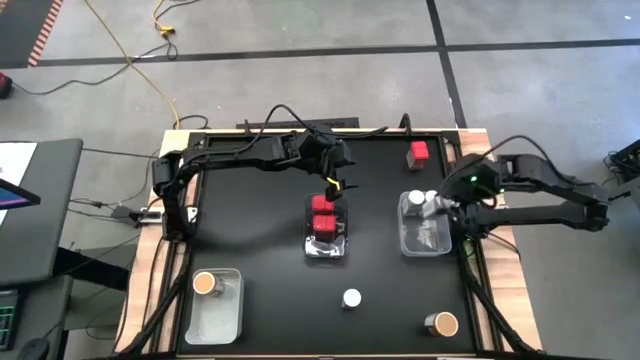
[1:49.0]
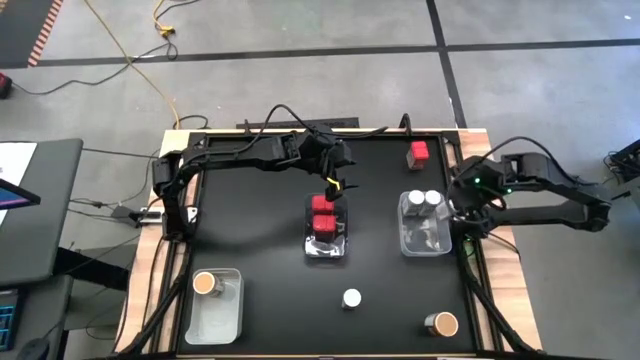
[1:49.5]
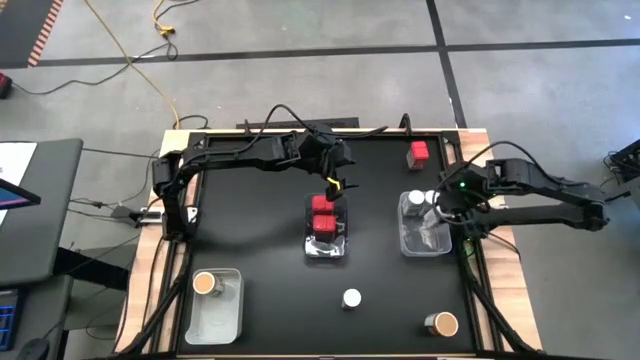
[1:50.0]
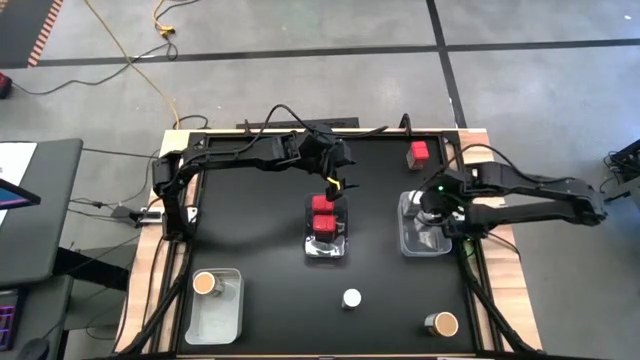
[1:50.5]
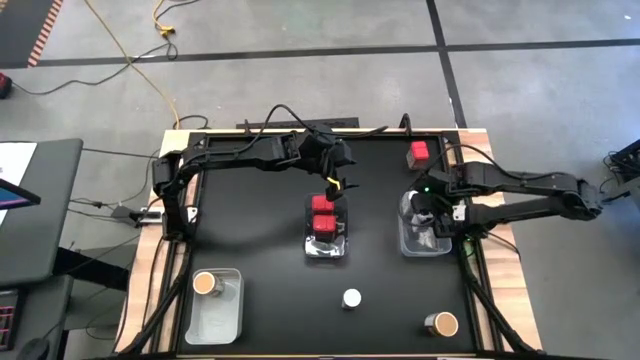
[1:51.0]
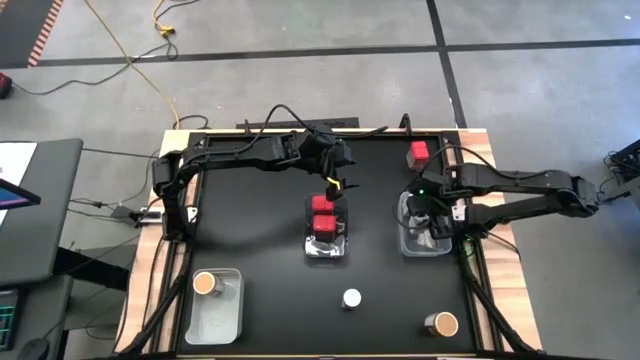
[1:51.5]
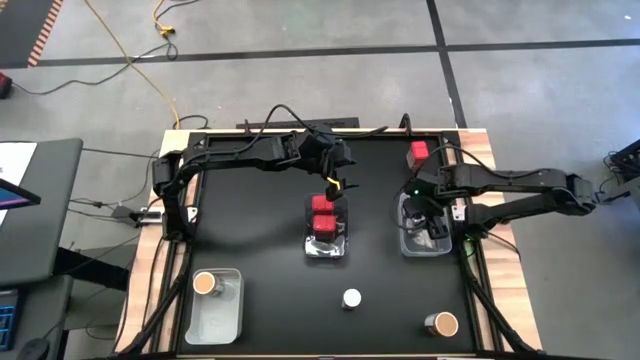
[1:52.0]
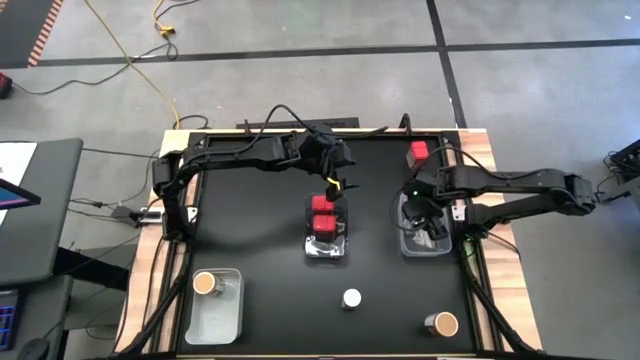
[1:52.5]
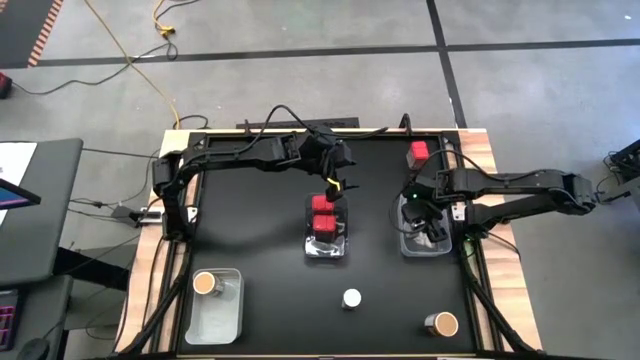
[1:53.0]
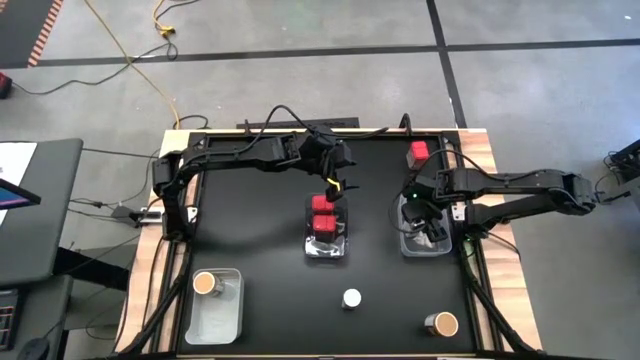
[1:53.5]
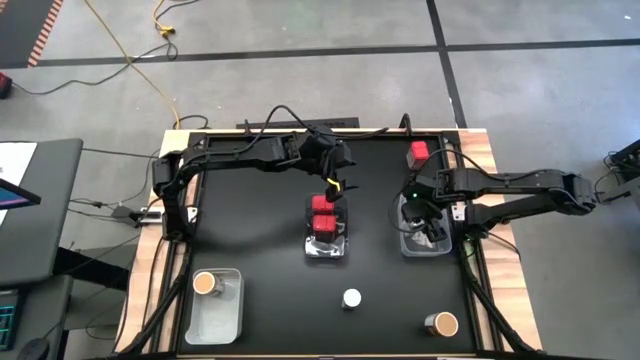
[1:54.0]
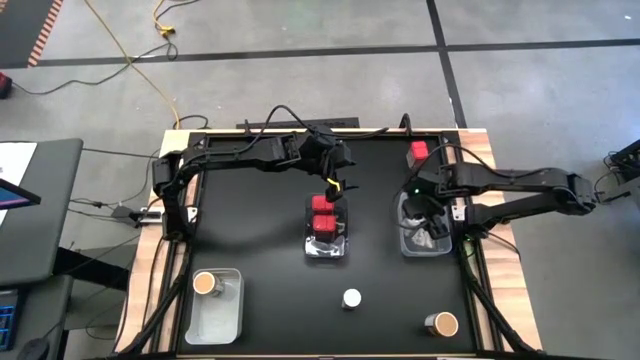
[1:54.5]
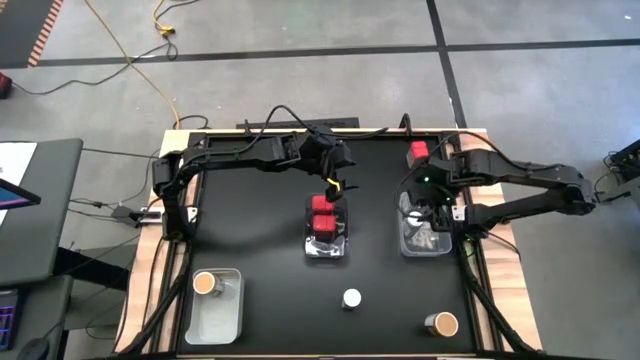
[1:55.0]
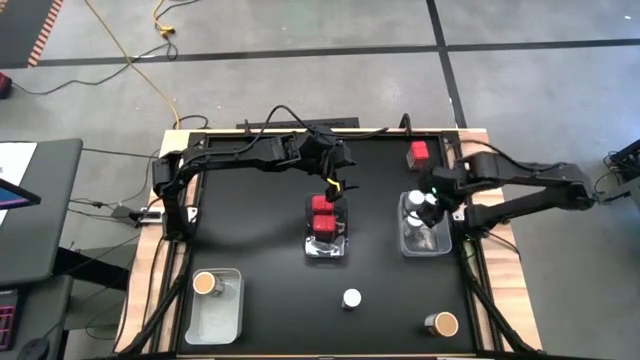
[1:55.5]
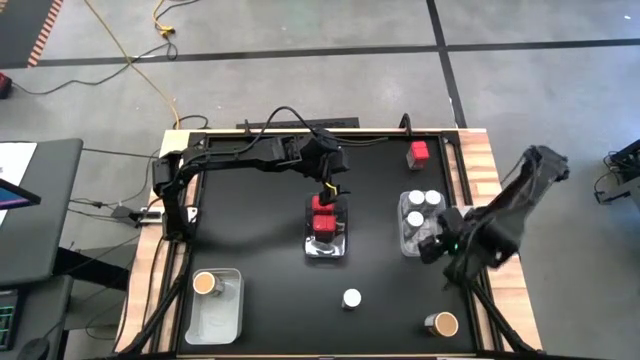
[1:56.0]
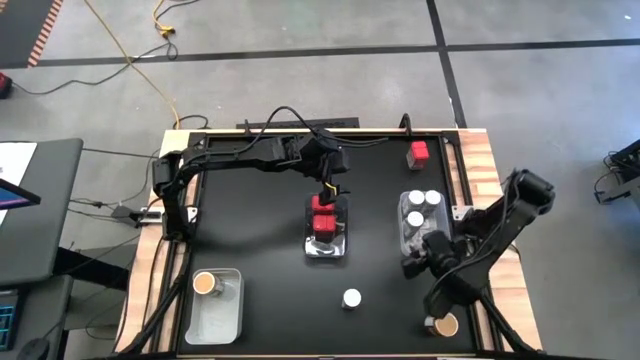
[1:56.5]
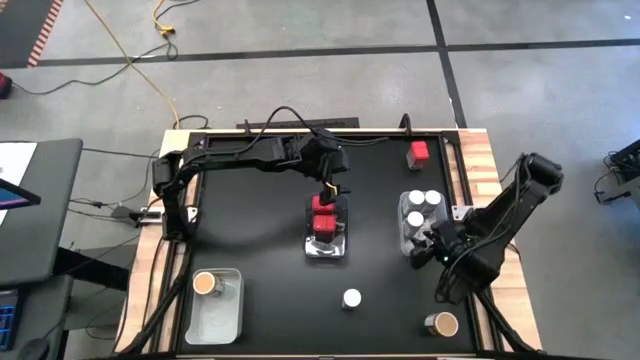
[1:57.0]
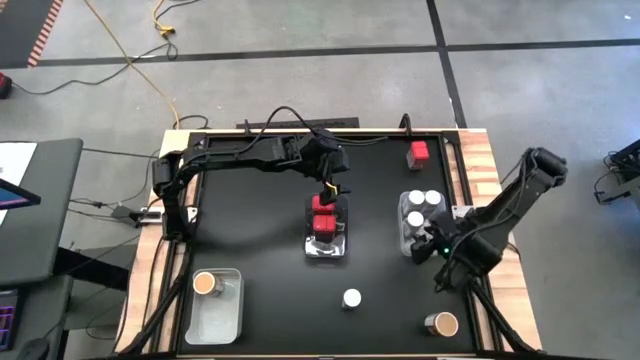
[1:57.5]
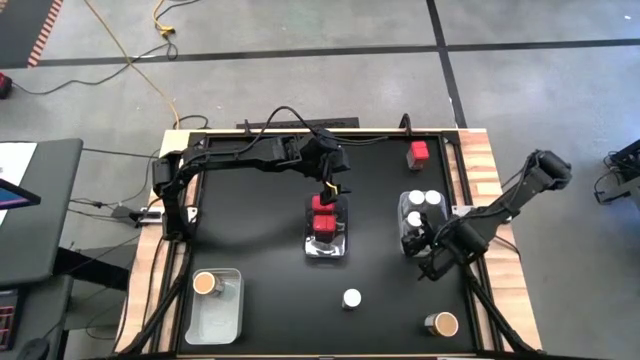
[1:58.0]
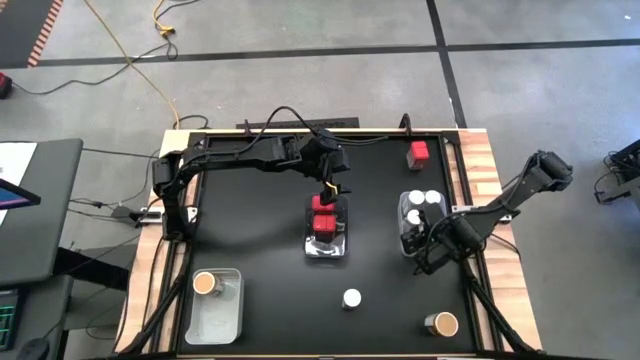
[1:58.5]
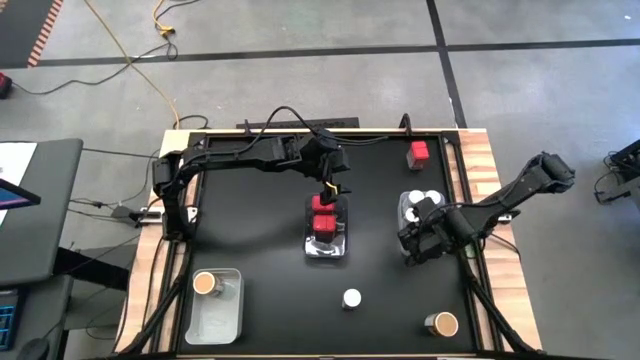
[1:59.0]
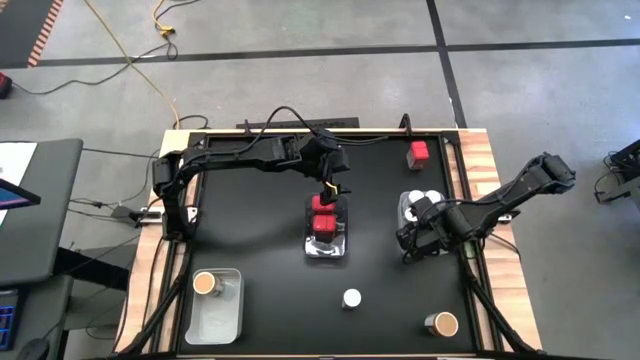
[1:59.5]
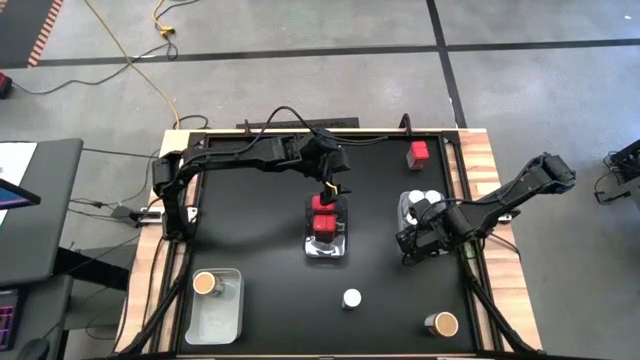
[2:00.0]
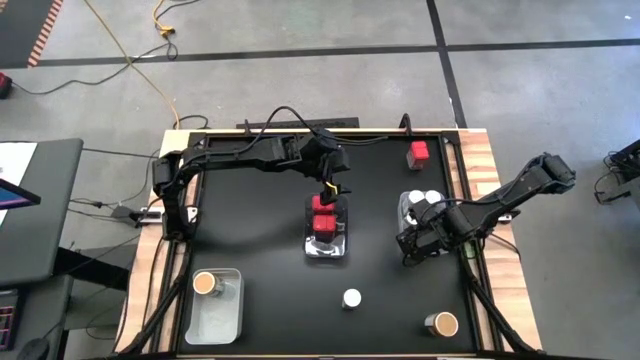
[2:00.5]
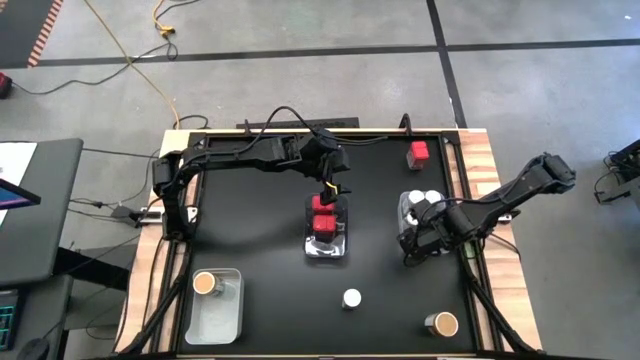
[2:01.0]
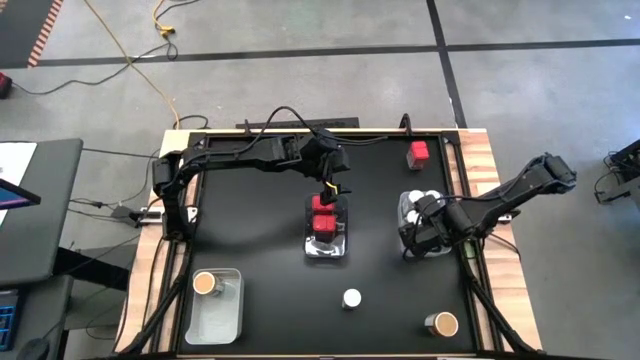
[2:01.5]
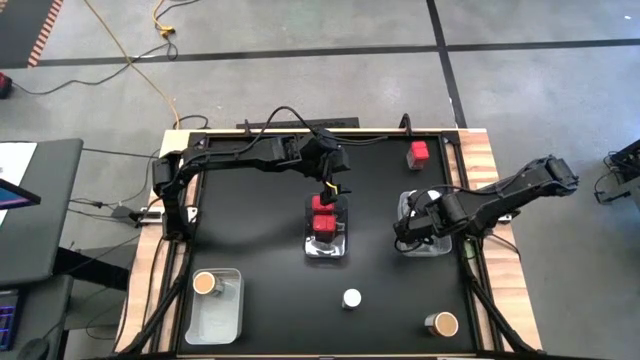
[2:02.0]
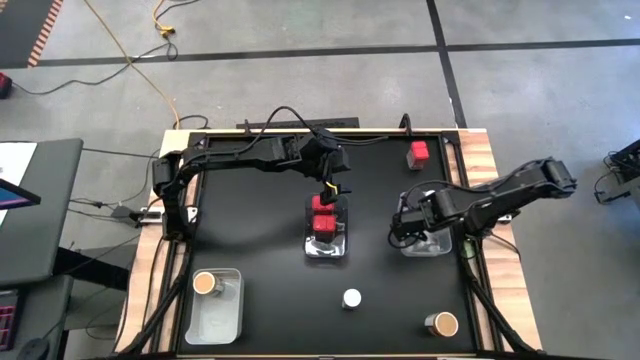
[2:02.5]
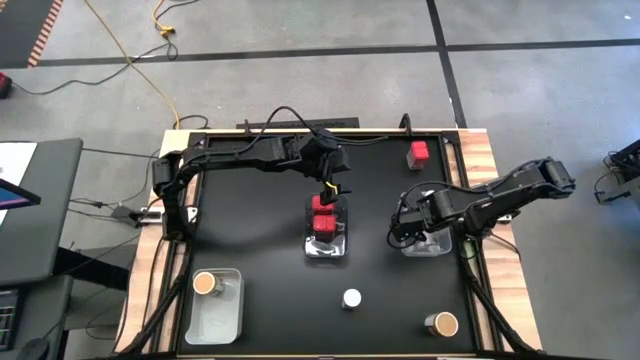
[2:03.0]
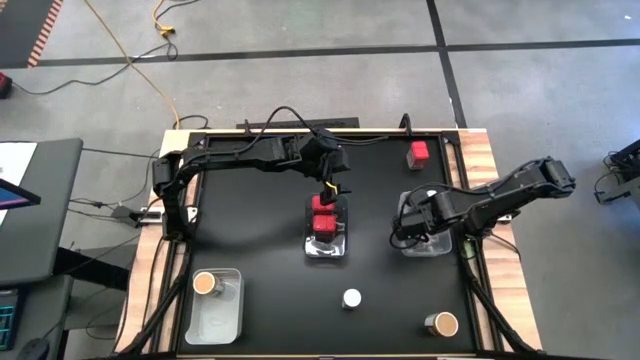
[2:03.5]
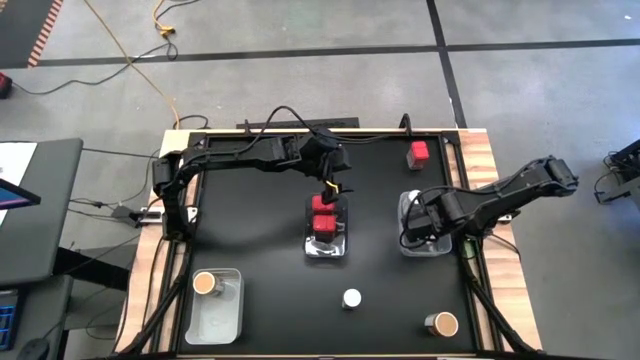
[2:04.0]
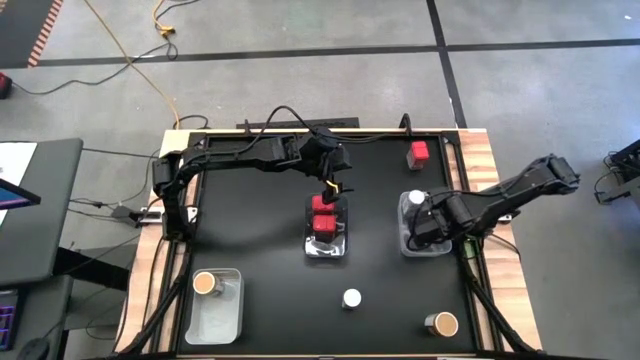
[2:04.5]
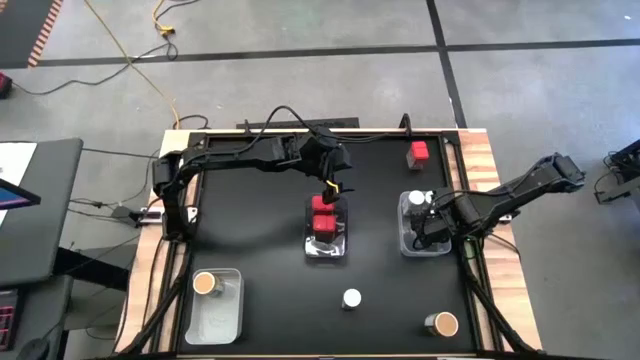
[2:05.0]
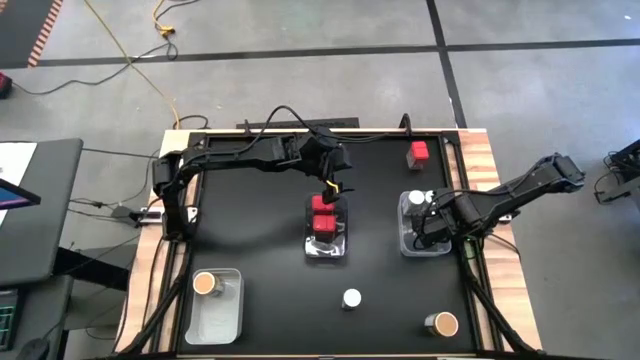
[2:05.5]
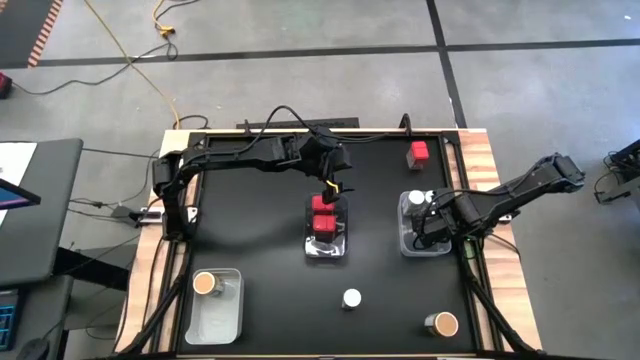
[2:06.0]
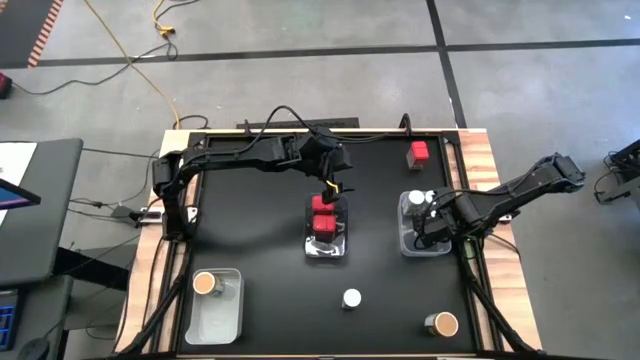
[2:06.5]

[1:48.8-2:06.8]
Task: Sort spices by type
Put the white seasoning bottle into the transparent bin

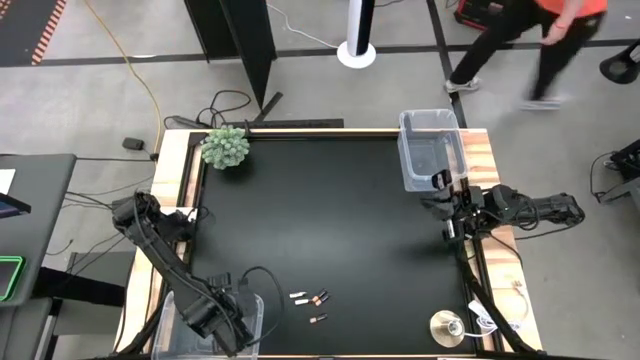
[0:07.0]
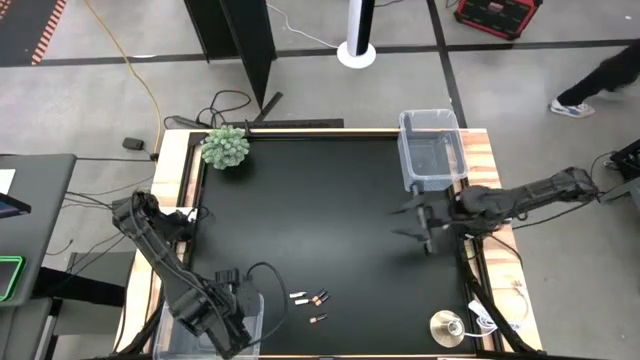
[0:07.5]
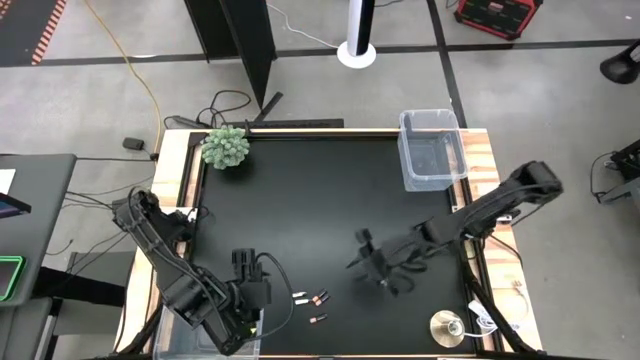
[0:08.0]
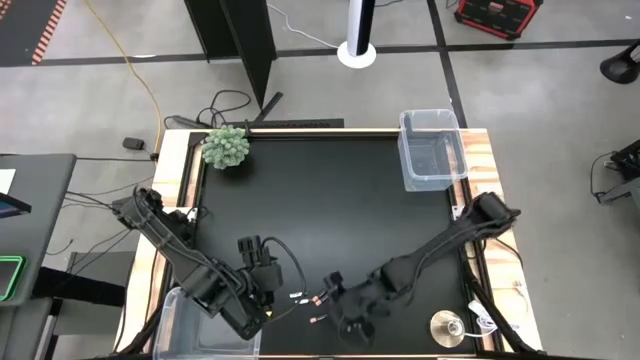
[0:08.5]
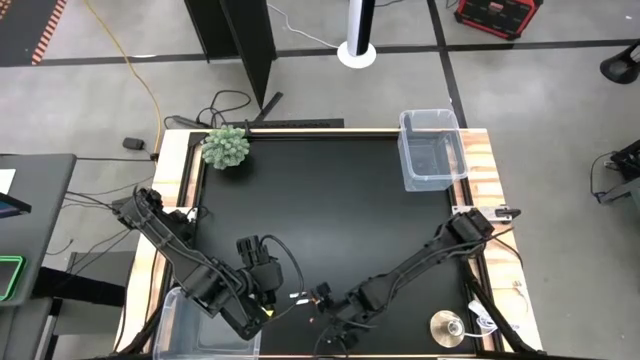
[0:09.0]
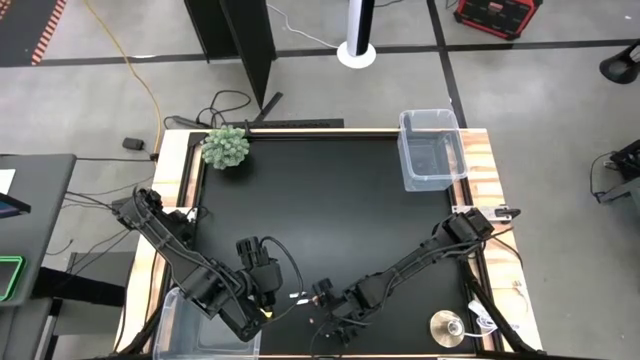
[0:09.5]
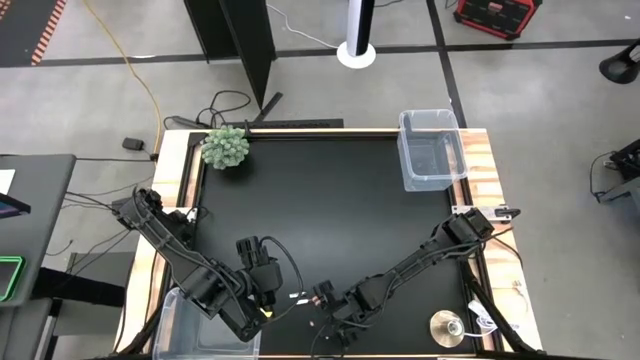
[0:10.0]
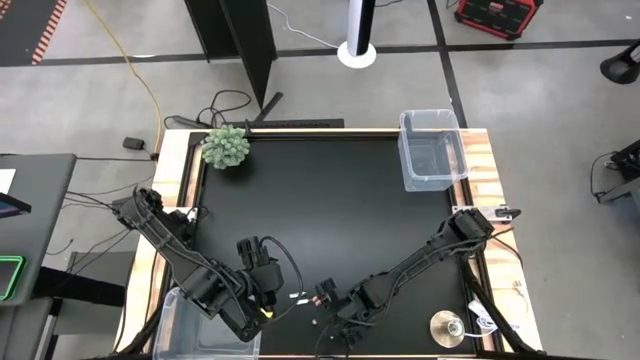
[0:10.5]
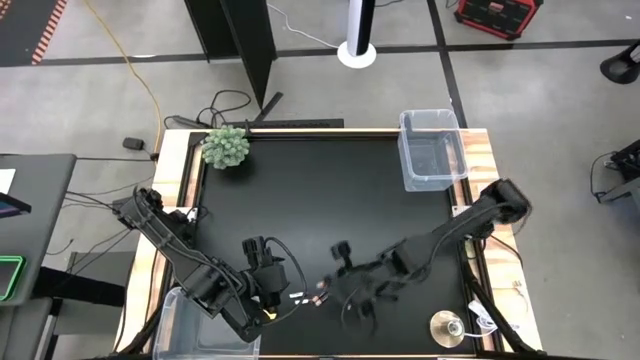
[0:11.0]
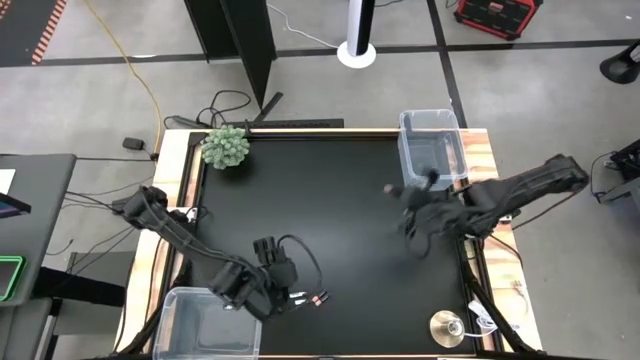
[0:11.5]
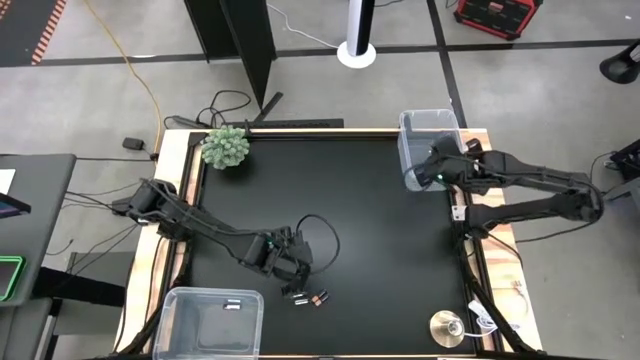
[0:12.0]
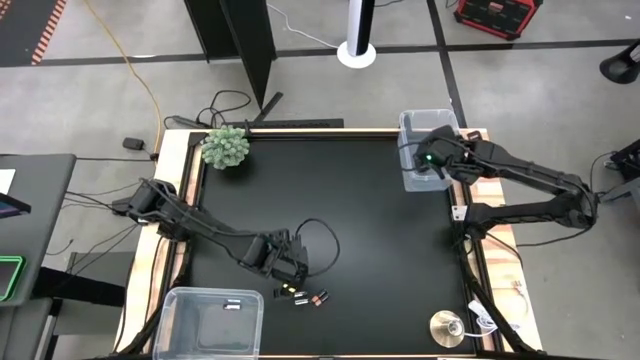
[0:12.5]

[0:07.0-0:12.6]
Task: Sort batteries
Put the bottom black battery into the top transparent bin
